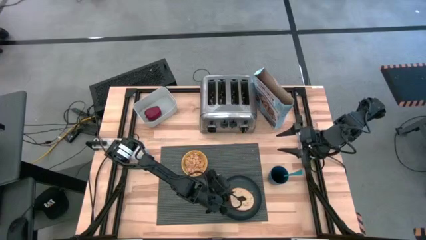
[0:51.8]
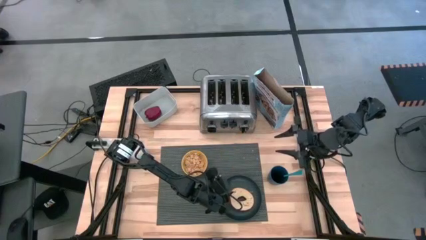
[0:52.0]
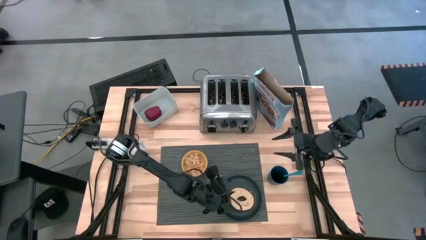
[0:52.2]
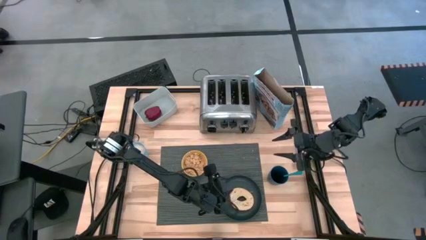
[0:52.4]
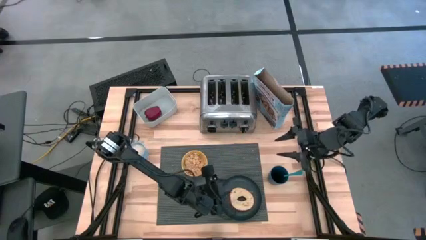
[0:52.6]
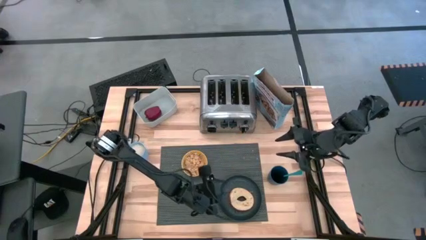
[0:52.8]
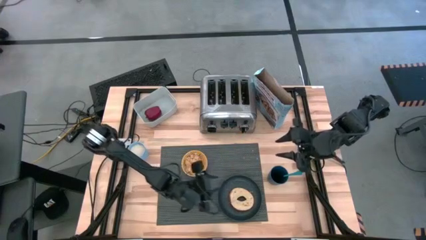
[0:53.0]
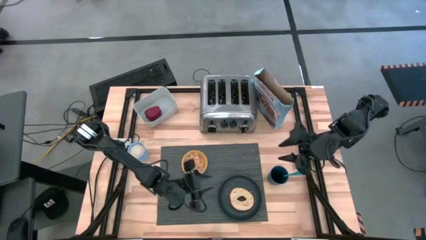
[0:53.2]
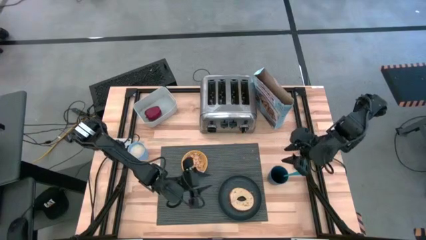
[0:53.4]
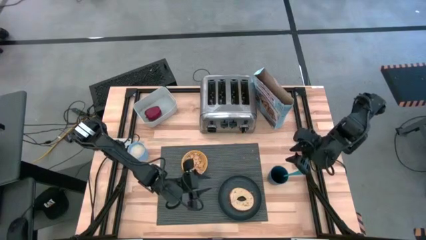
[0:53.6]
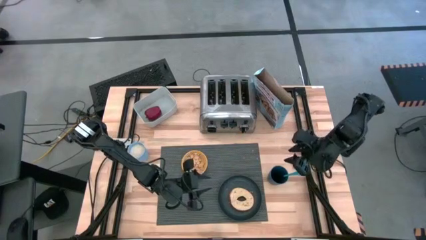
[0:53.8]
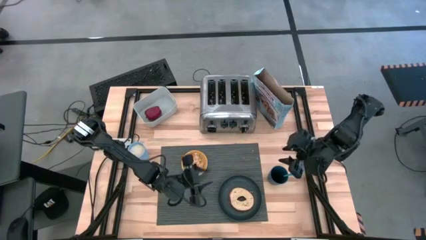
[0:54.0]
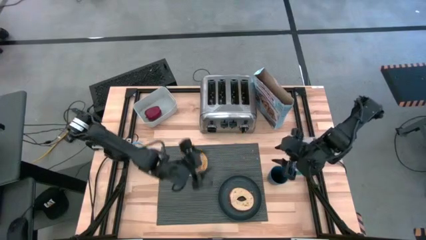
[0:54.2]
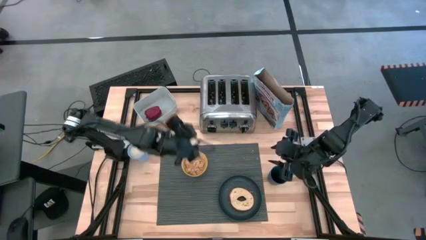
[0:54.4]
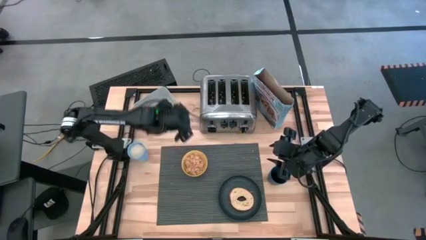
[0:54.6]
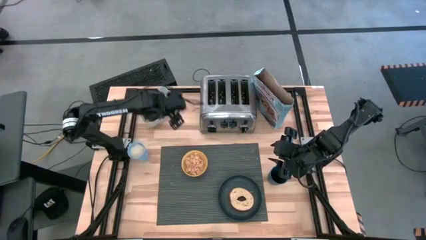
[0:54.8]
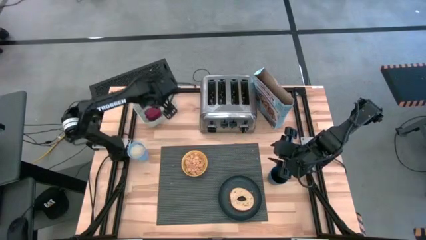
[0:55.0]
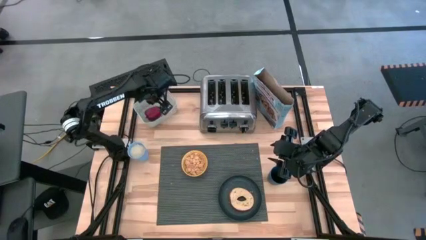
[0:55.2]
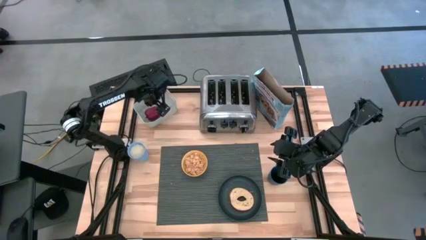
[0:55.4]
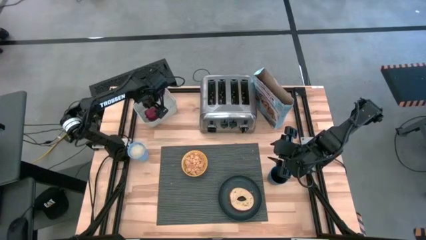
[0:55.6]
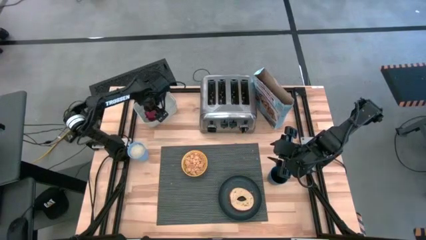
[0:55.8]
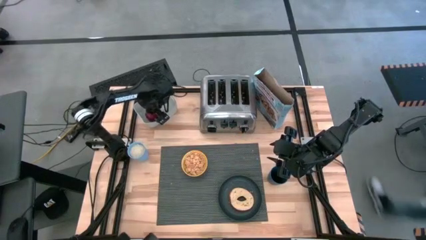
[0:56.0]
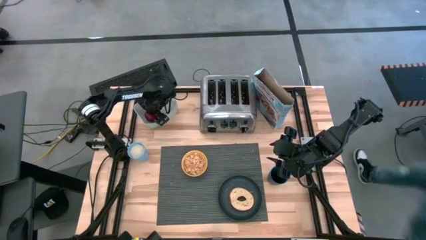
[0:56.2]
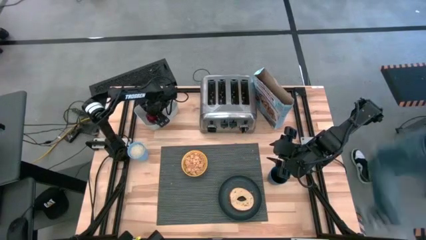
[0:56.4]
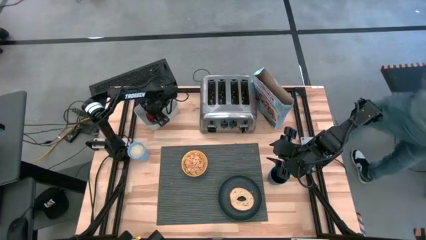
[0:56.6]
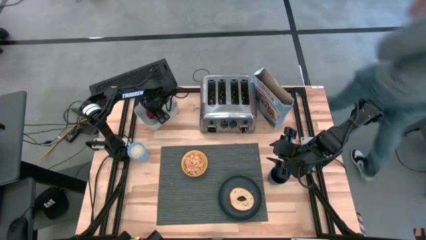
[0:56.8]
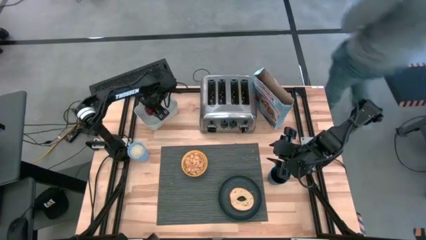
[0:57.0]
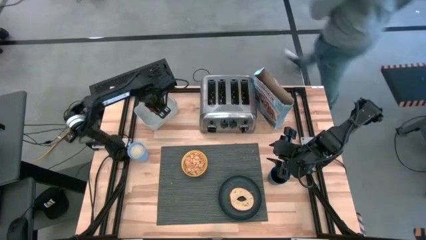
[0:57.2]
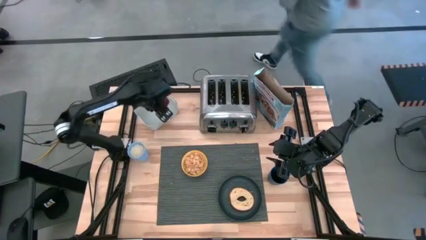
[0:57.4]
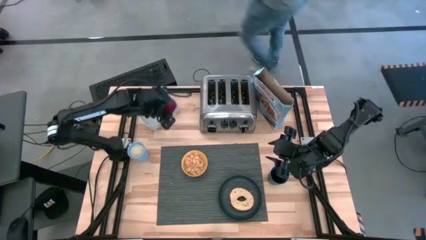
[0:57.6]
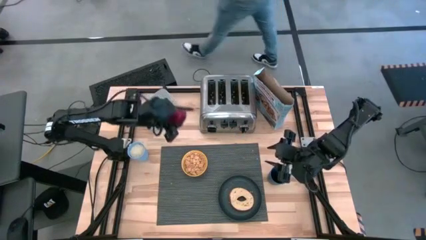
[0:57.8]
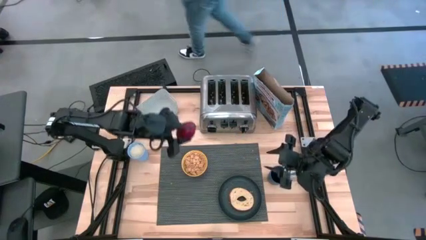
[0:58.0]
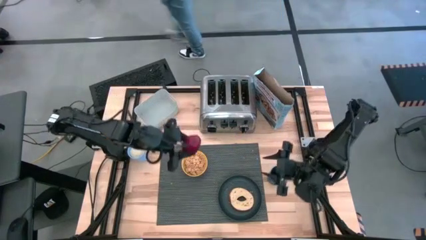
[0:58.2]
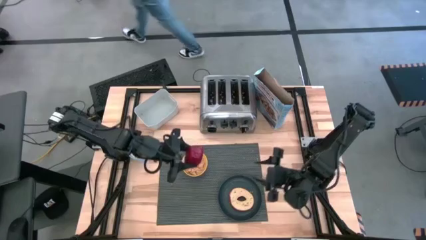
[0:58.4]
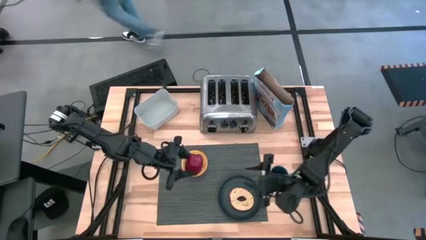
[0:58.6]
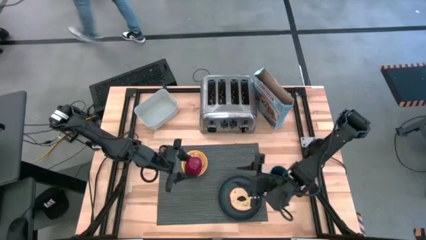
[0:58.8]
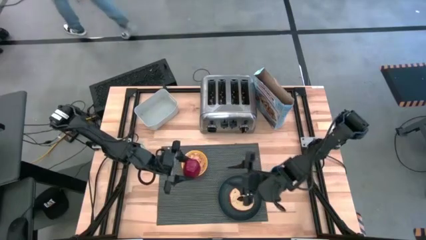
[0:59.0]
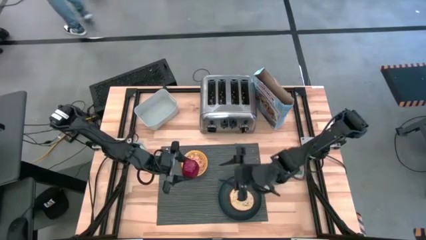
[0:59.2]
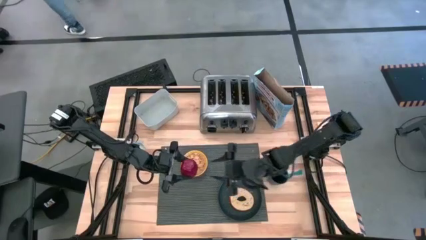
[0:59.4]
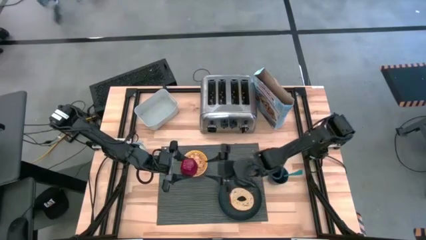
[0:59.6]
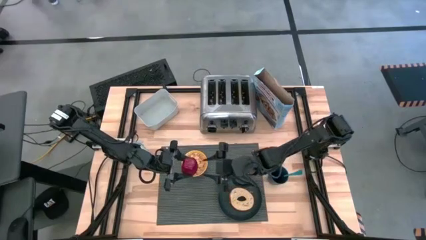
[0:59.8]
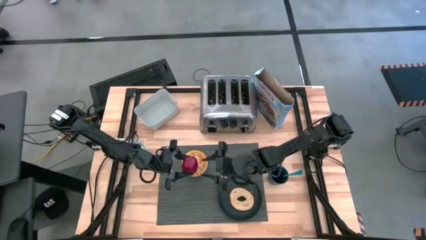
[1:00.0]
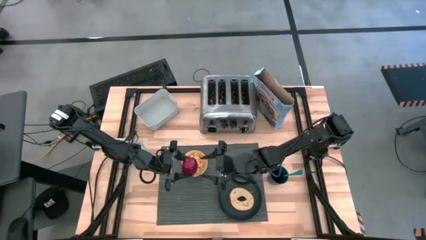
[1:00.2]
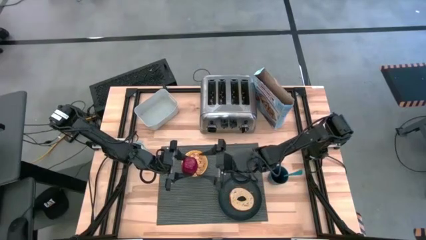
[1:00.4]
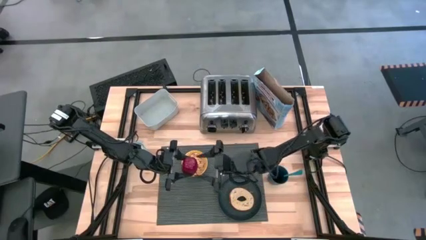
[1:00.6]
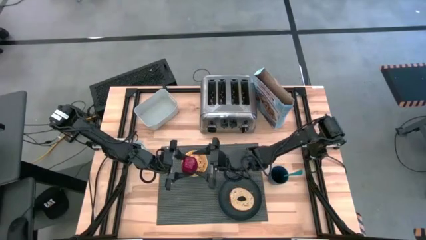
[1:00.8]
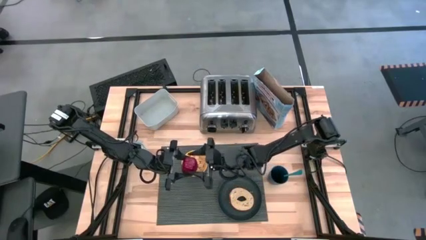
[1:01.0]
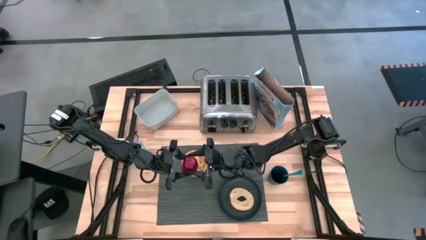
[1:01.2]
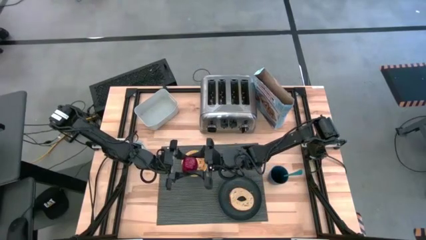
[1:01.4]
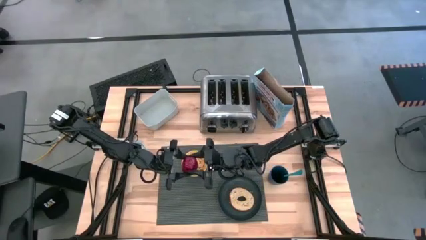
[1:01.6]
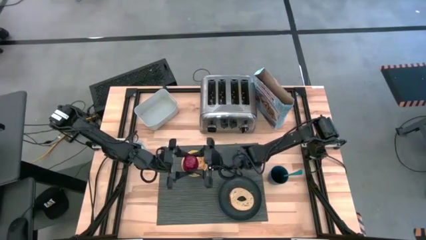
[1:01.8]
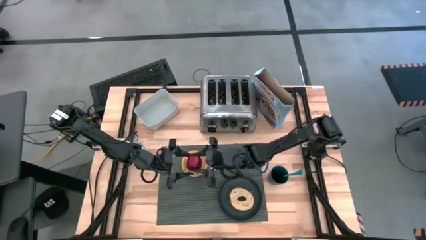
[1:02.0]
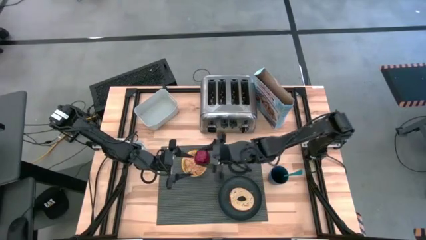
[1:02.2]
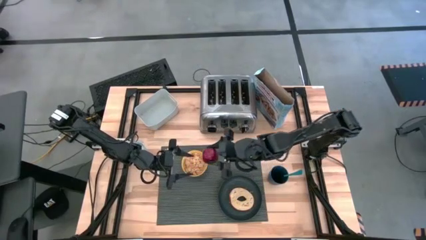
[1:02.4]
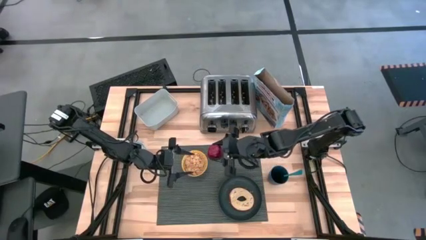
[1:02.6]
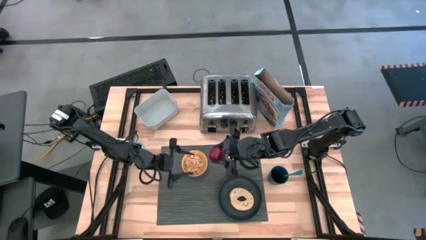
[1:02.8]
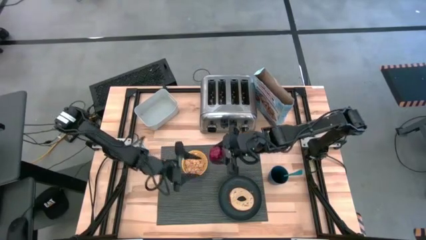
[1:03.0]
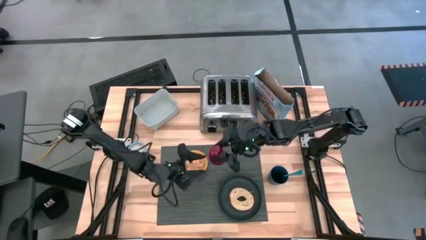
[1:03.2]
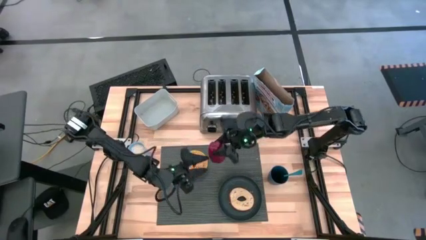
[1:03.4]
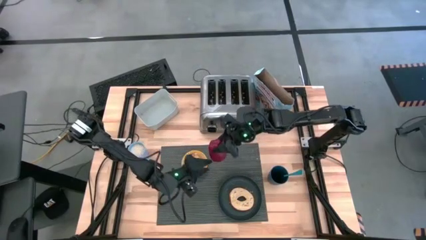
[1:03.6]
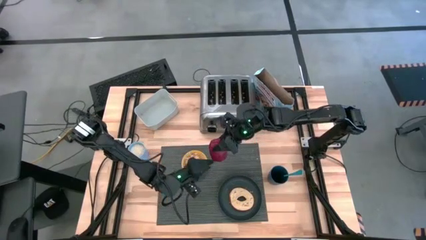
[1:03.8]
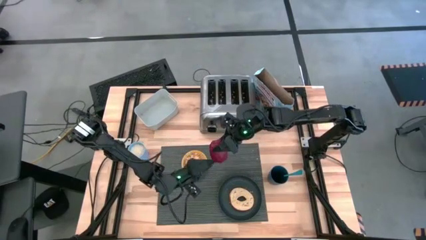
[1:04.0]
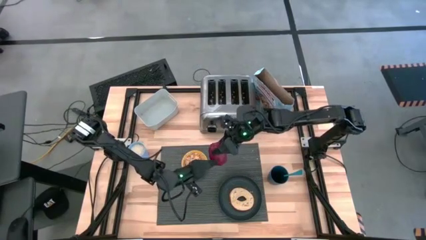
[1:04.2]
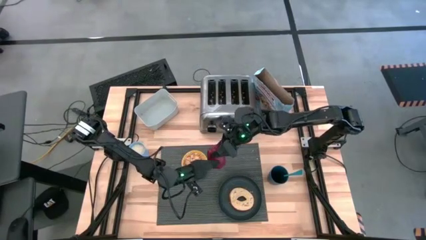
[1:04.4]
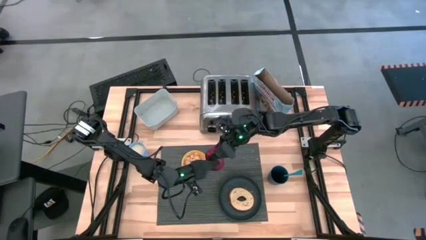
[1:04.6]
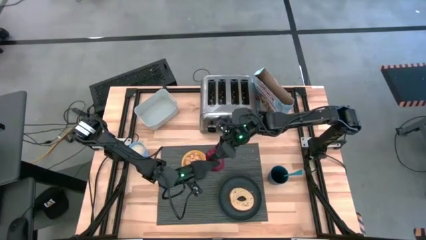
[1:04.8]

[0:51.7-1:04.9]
Task: Arrange a breakfast setting
Put the apple on the gray place mat to the right side of the yellow bowl

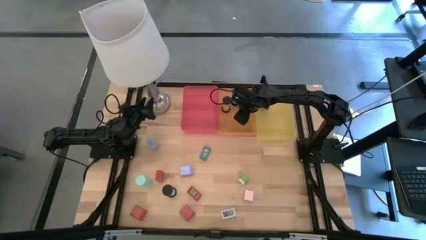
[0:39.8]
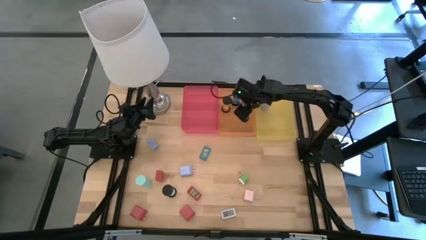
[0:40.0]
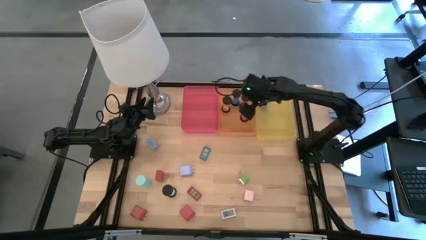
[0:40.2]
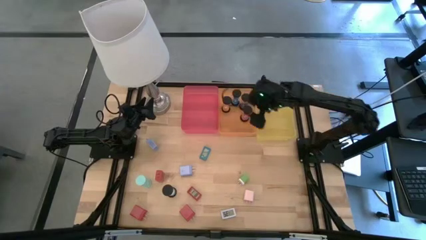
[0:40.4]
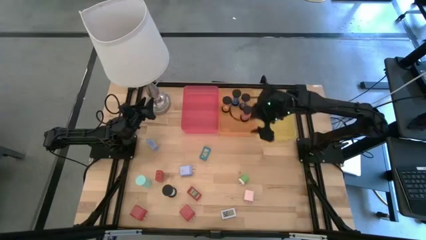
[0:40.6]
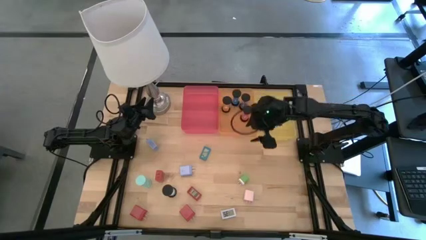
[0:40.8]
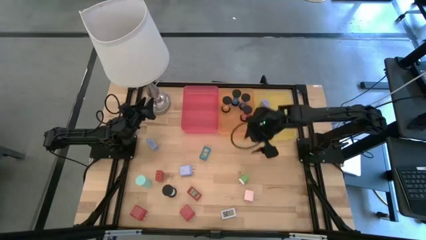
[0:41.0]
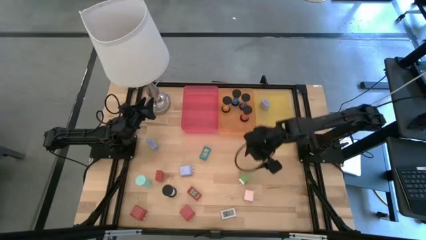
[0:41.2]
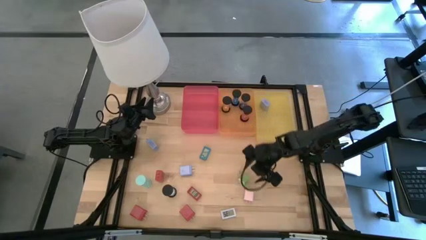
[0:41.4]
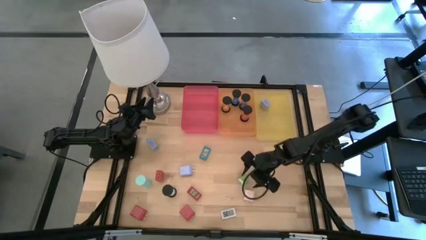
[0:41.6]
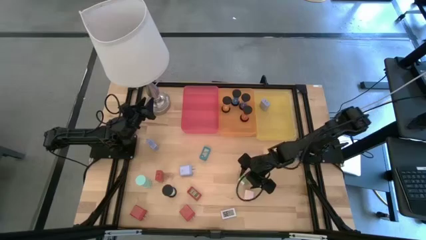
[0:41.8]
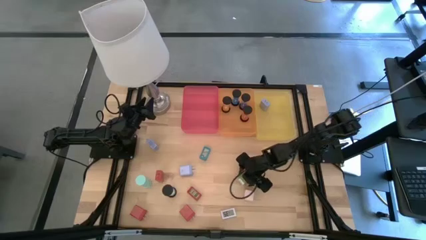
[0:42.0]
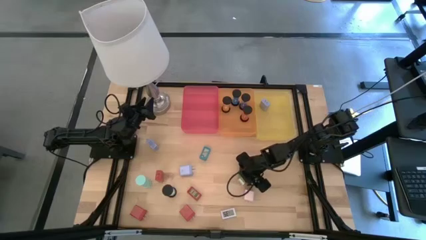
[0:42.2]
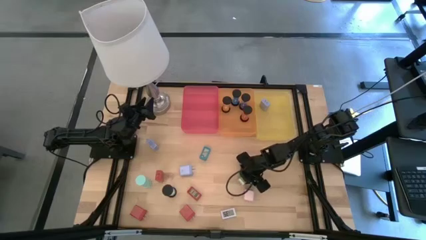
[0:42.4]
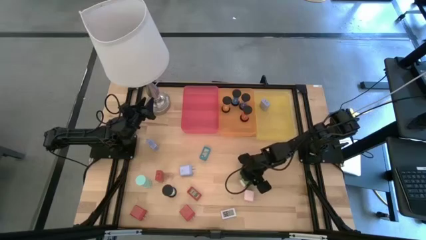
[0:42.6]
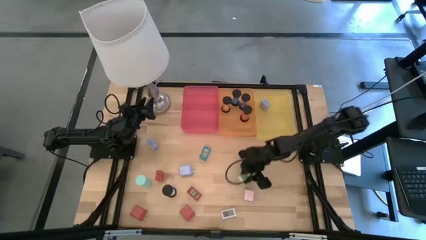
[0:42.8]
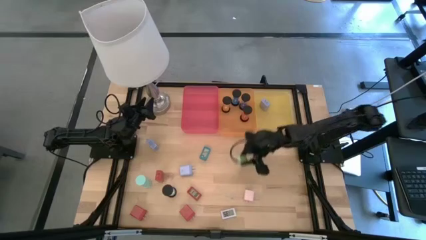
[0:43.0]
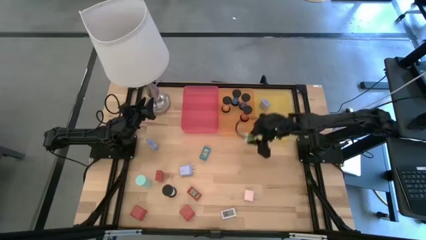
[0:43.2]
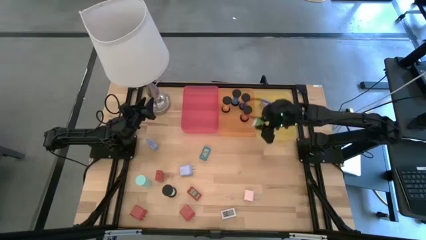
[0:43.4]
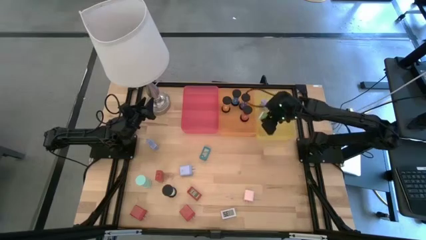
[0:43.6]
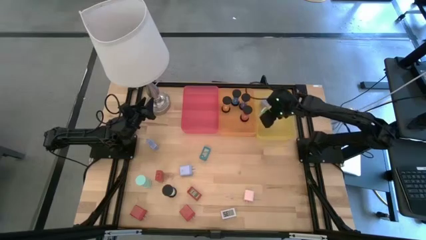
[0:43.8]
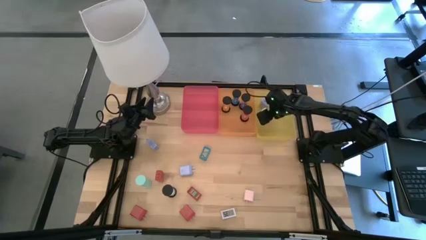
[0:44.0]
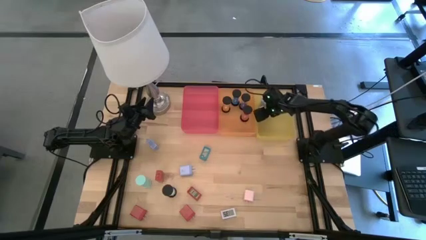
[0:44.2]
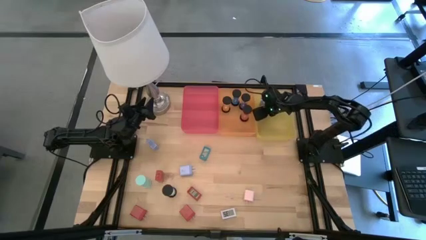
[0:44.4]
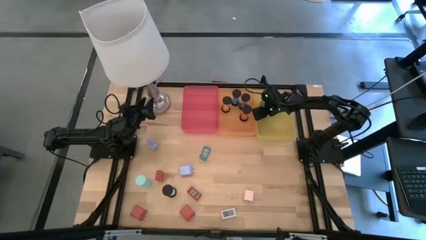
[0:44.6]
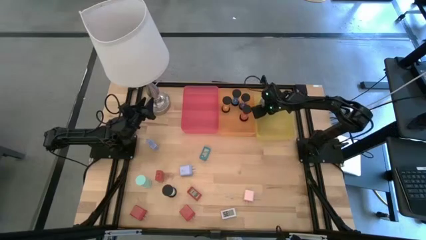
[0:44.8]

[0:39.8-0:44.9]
Task: Pick & Place Office items
Put the green charger adapter into the yellow bin
